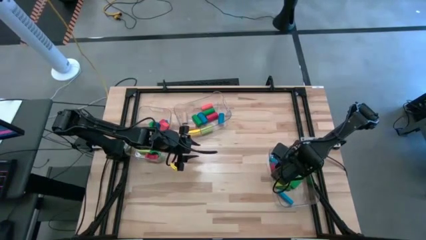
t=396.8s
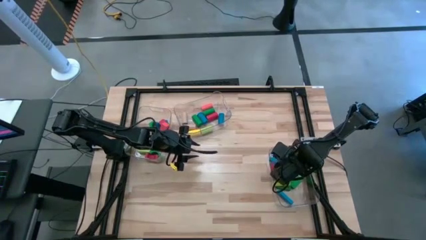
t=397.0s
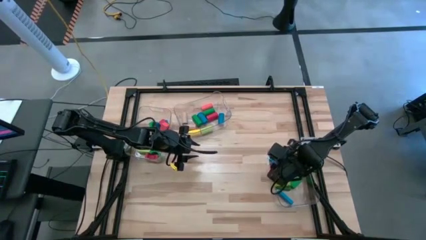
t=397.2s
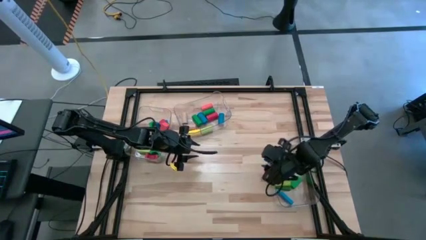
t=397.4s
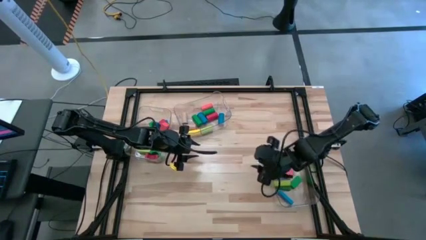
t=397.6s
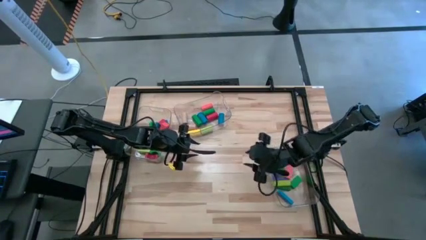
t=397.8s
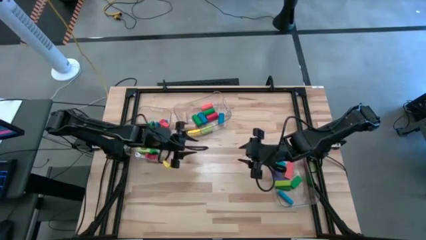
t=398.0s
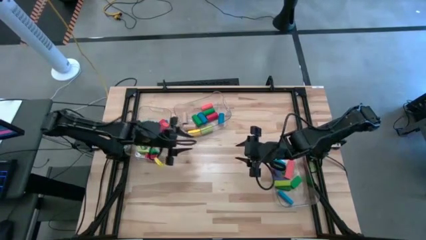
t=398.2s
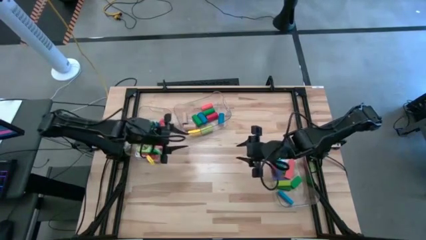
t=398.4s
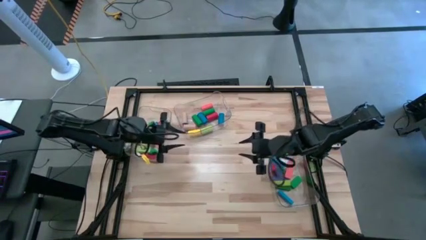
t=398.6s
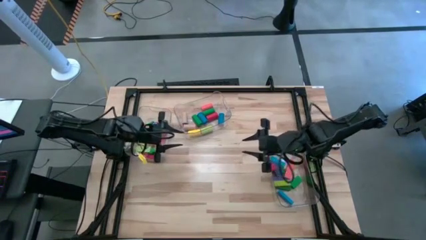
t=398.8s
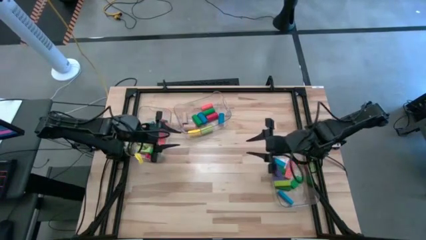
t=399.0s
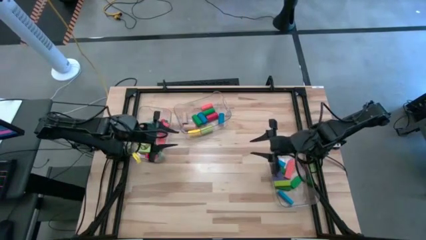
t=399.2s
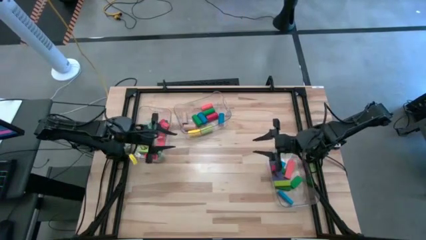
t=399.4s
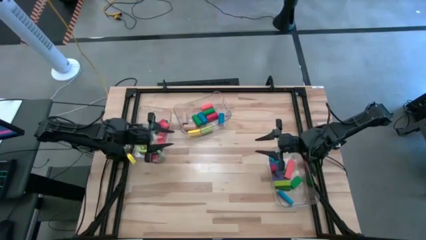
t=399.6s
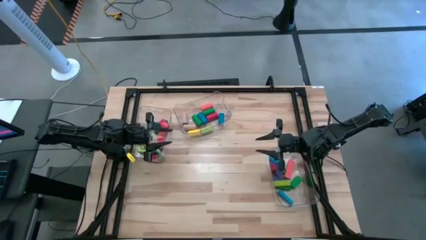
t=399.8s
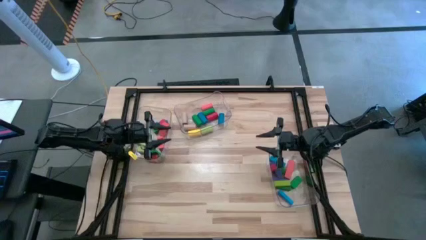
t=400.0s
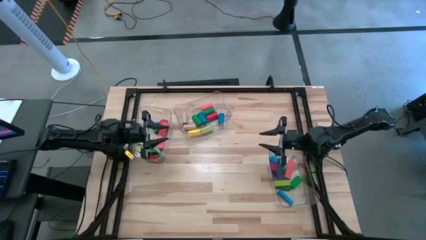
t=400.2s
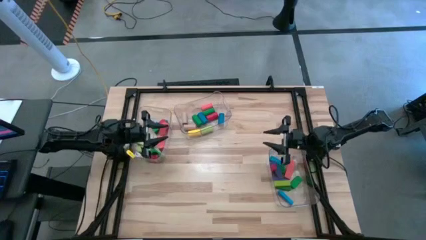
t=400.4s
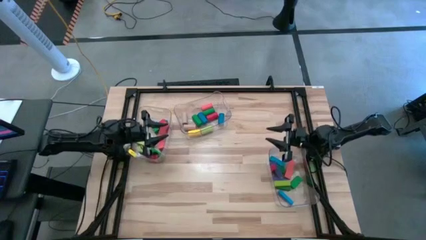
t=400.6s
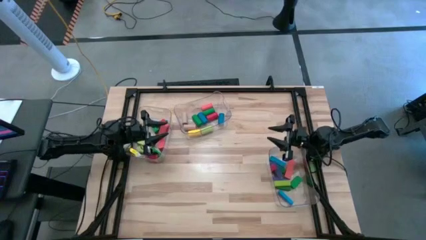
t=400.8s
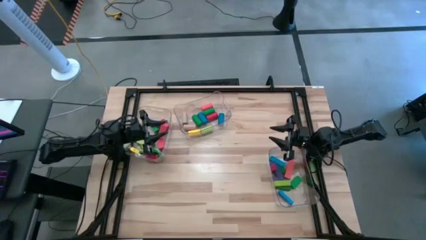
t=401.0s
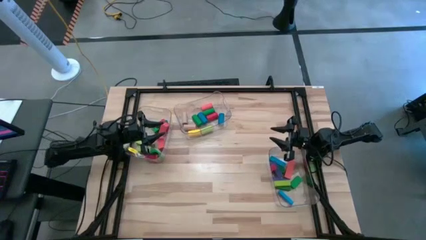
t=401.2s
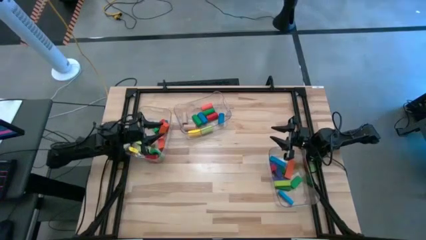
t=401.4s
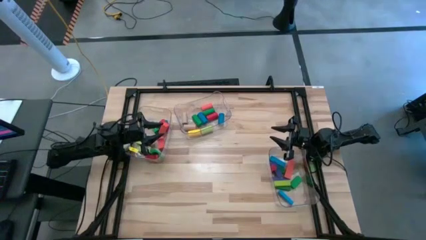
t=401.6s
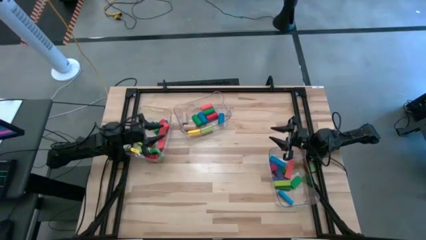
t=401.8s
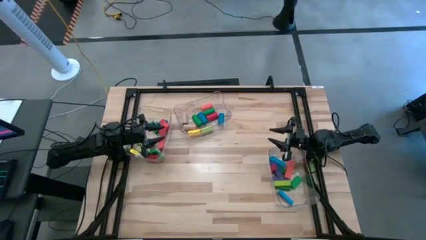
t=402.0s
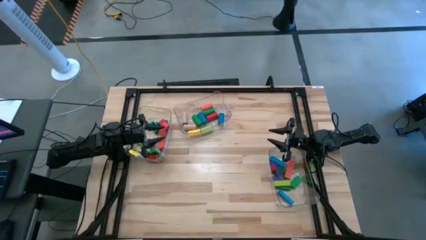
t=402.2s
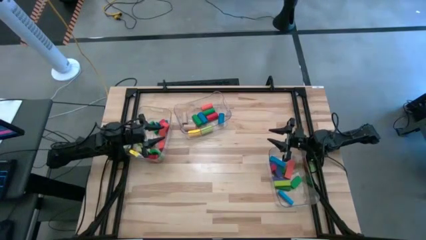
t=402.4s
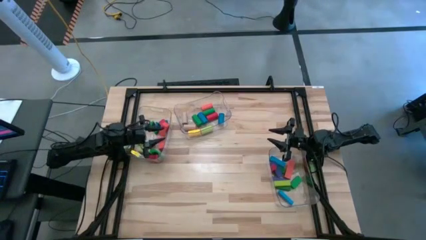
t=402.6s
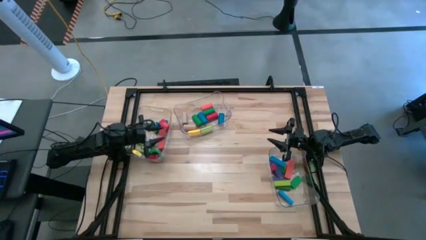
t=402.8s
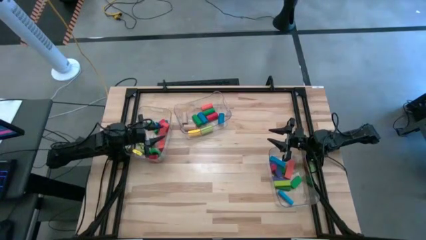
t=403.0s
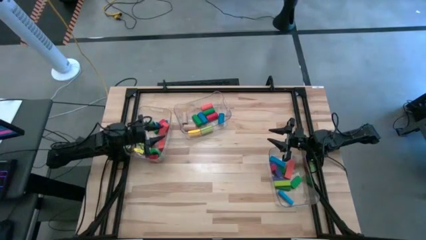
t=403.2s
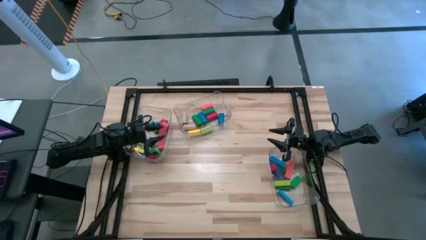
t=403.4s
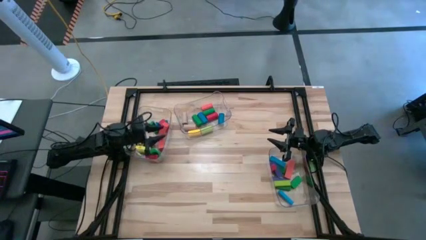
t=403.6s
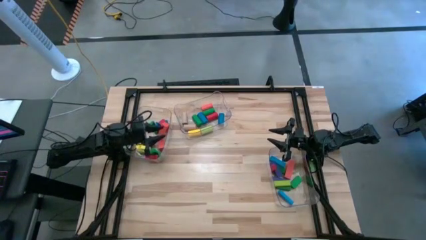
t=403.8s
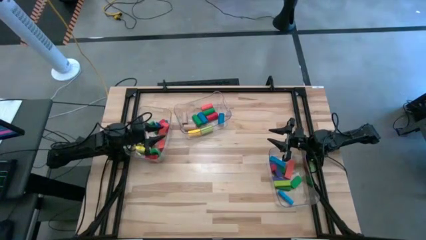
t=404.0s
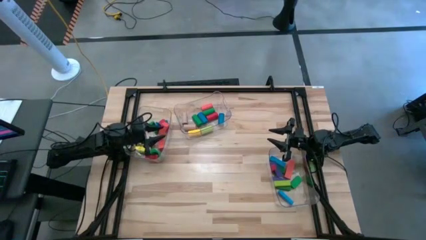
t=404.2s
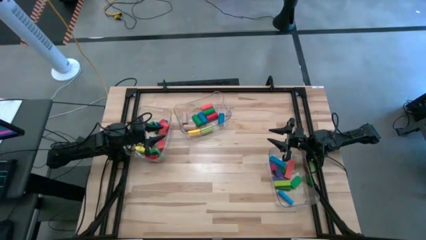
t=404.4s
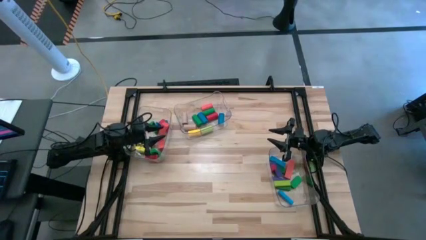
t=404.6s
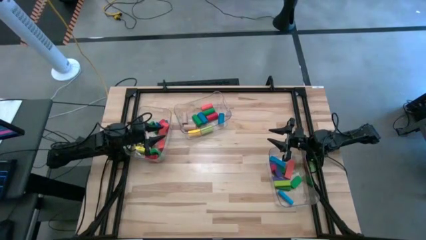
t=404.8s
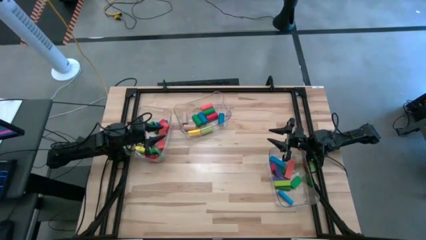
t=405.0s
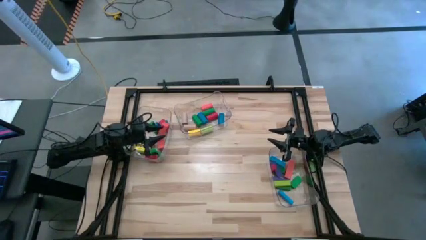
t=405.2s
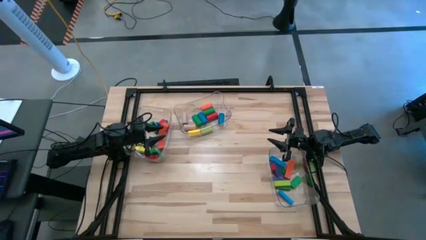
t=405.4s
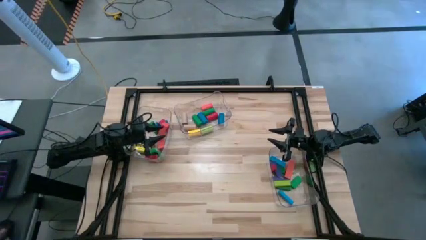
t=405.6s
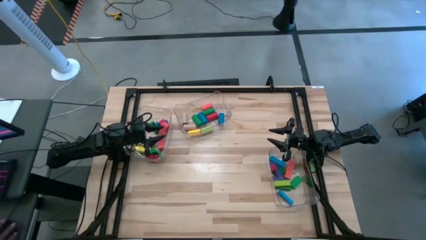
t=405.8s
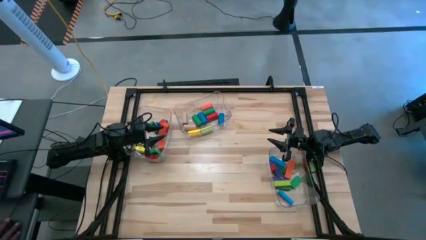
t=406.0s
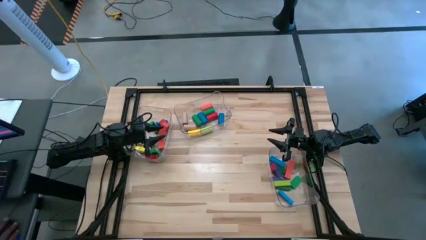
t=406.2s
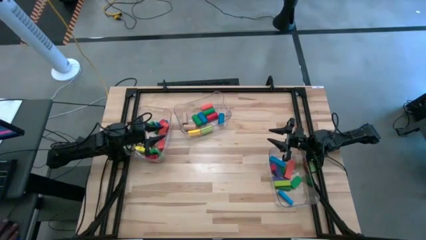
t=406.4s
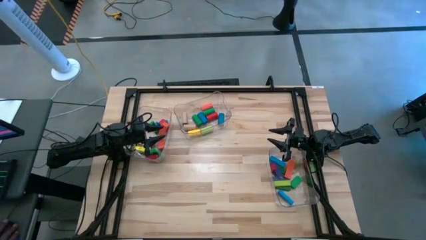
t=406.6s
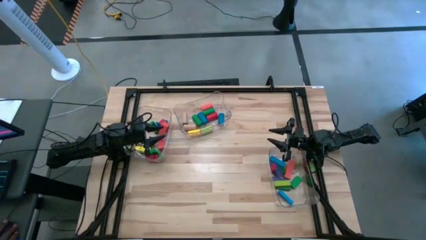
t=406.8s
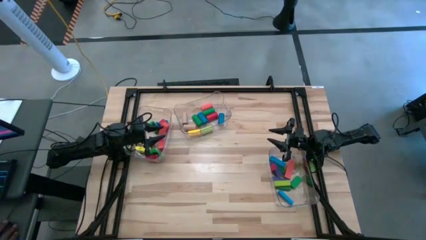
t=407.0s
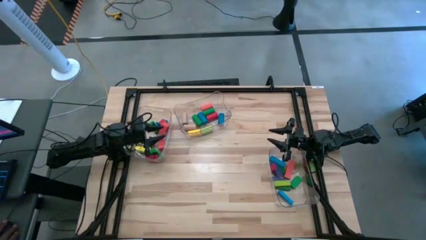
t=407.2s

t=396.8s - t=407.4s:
Task: Sort blocks by size
Return to Home Position

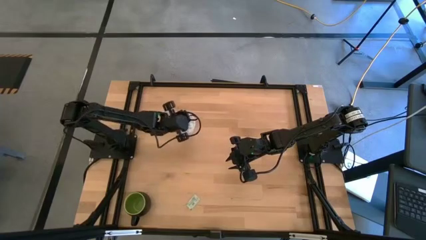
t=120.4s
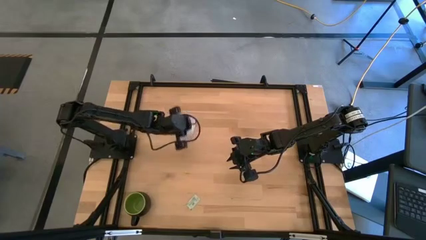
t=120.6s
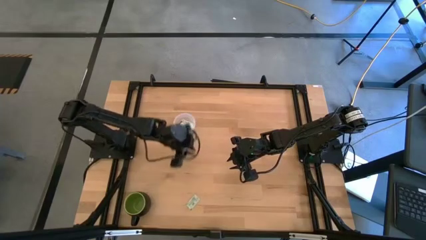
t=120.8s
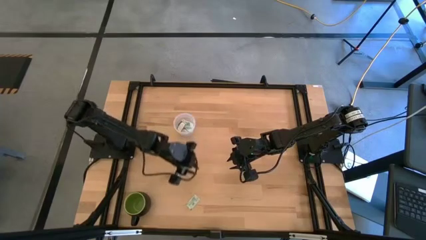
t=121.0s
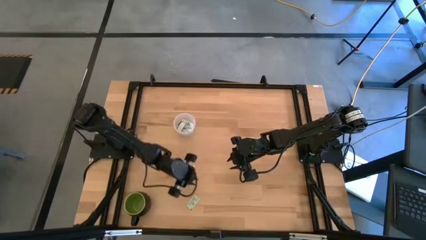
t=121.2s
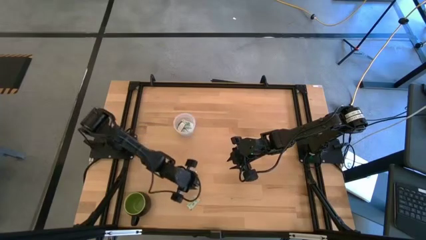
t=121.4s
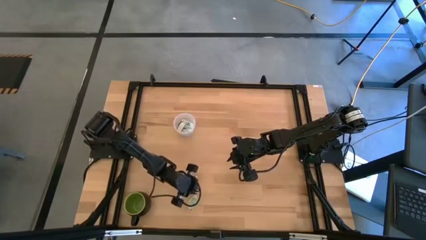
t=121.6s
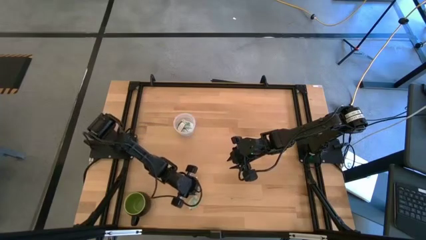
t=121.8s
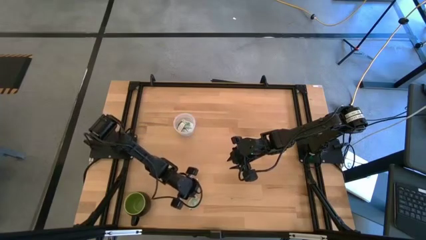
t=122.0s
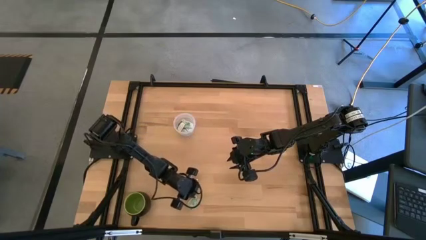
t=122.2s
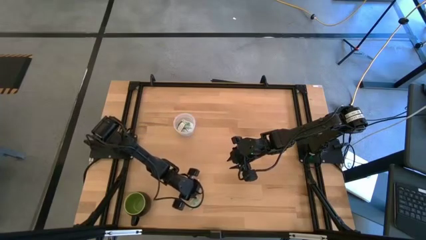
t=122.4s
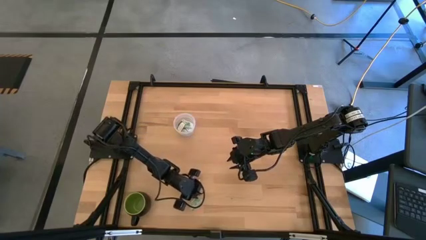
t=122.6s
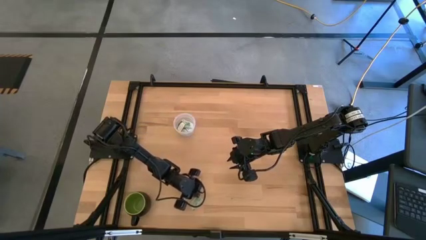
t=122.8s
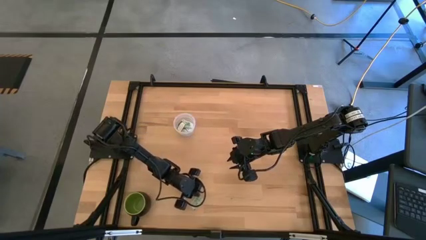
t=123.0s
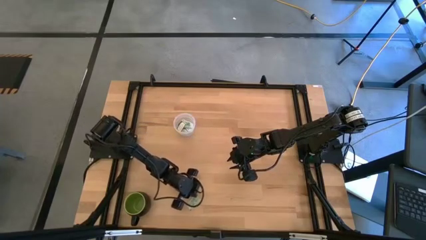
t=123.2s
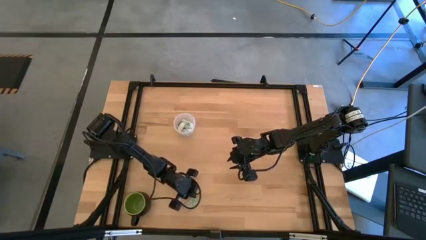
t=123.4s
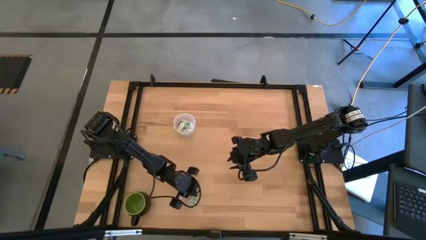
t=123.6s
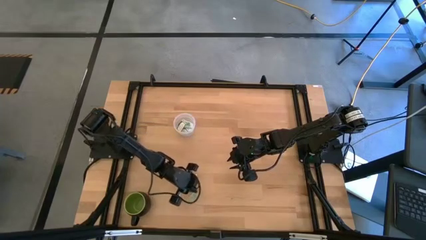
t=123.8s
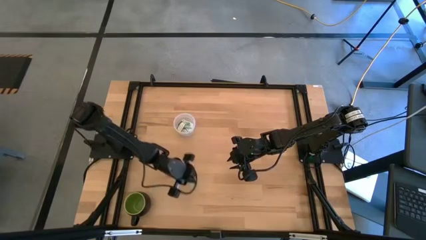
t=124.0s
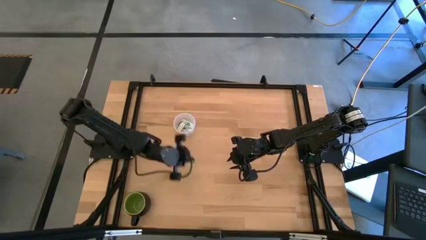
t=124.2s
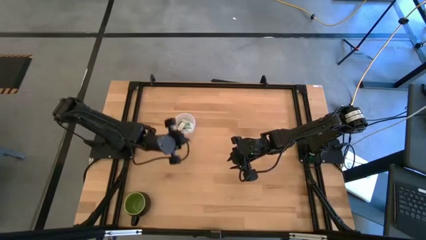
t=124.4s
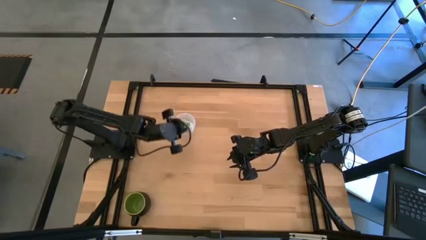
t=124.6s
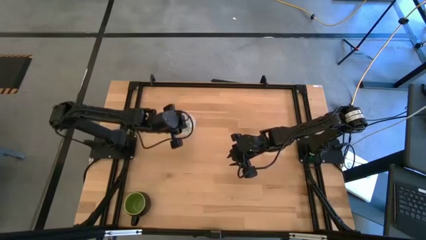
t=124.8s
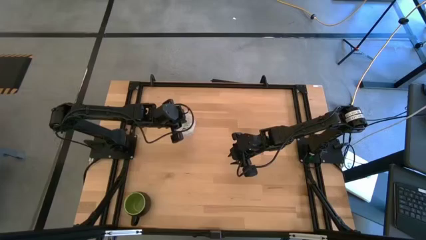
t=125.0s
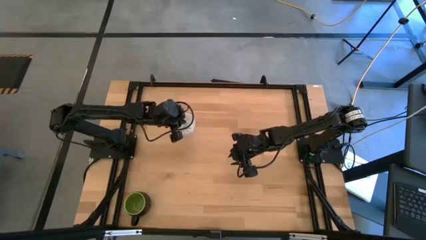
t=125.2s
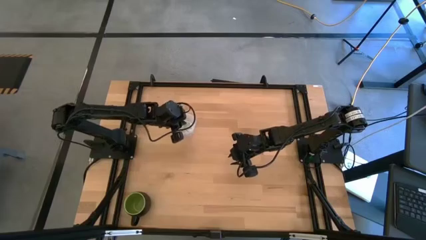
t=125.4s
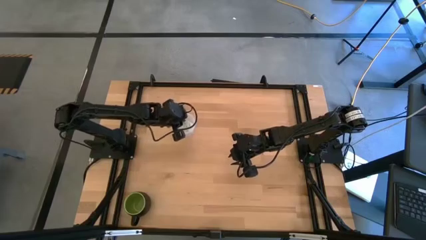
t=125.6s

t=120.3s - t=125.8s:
Task: Pick and place Stevia / Truvia into bins
Put the light green stevia packet into the transparent container
